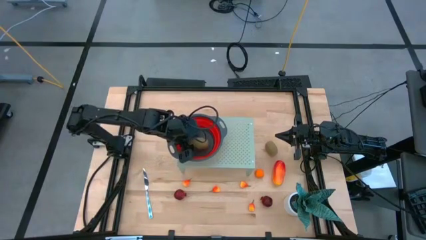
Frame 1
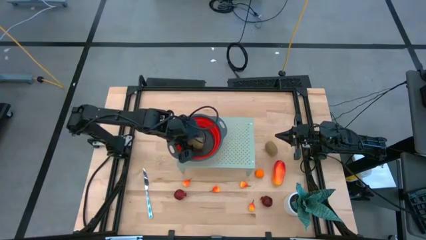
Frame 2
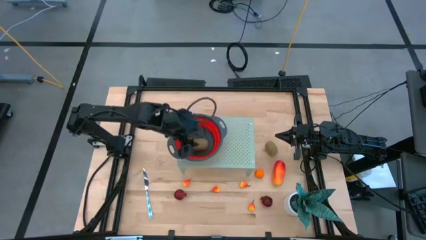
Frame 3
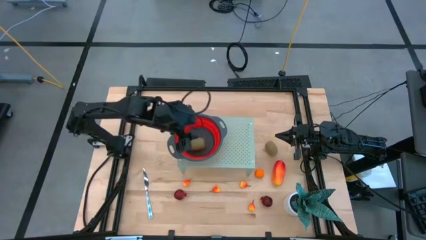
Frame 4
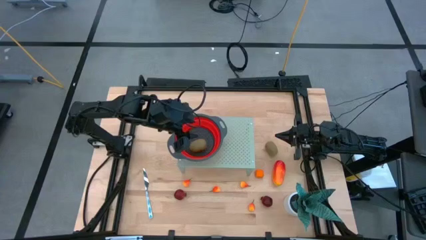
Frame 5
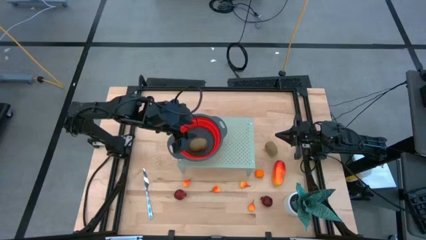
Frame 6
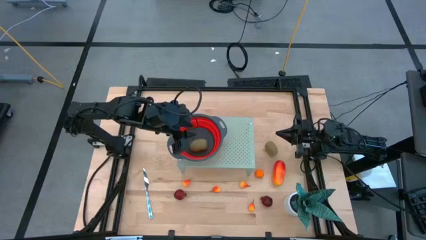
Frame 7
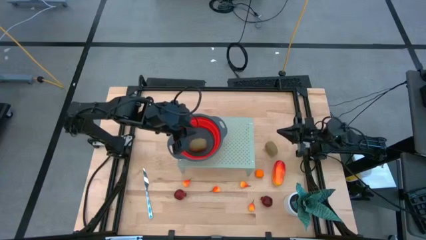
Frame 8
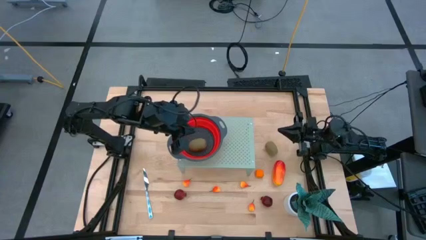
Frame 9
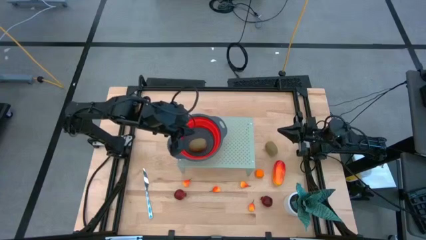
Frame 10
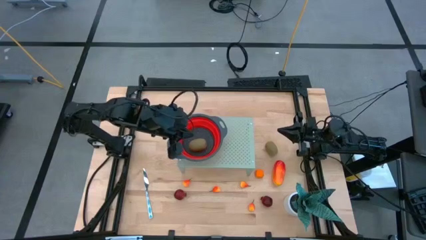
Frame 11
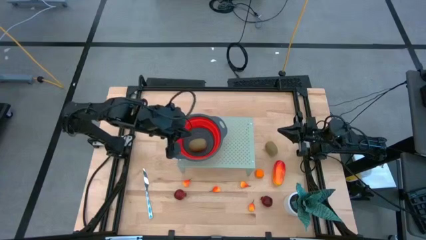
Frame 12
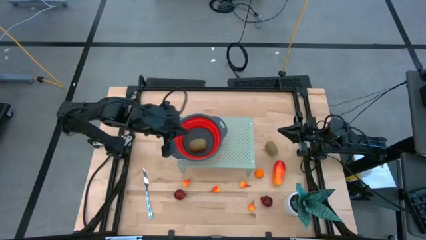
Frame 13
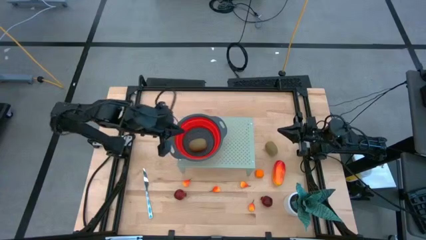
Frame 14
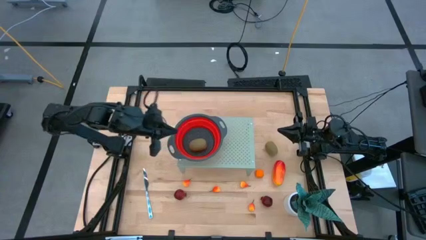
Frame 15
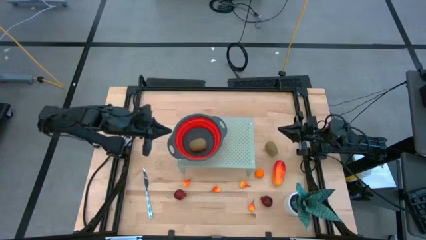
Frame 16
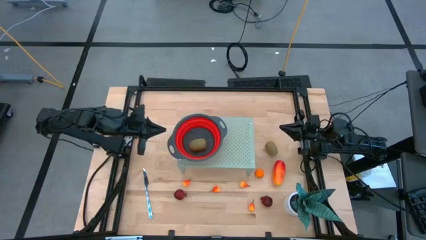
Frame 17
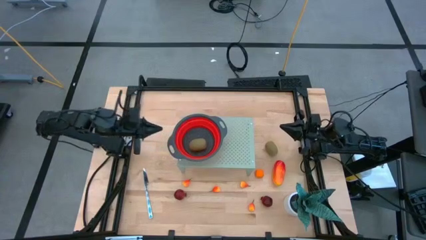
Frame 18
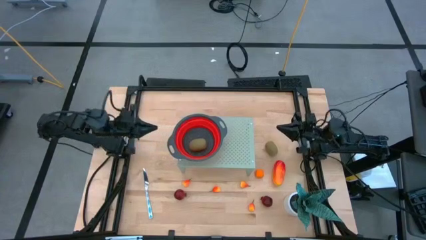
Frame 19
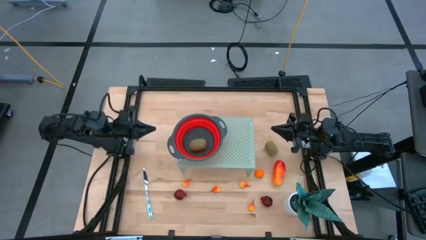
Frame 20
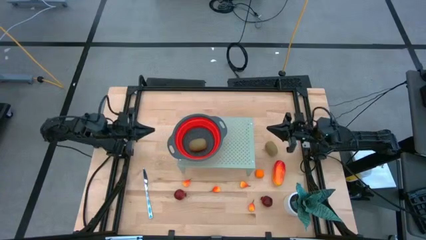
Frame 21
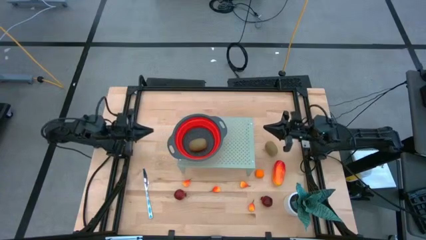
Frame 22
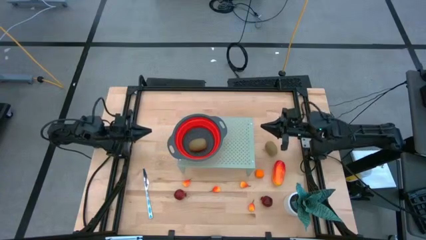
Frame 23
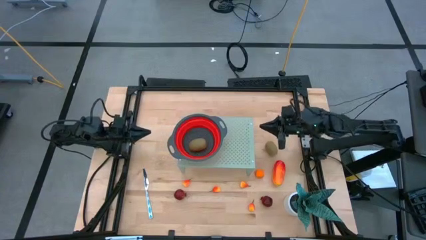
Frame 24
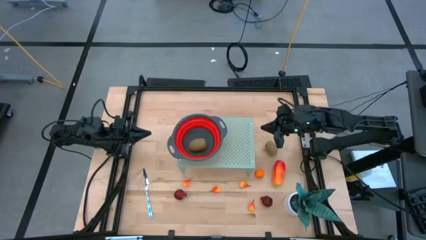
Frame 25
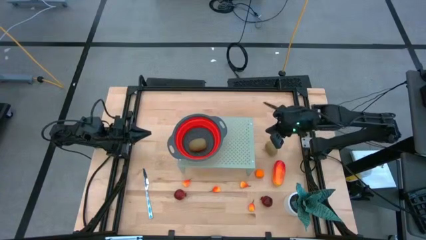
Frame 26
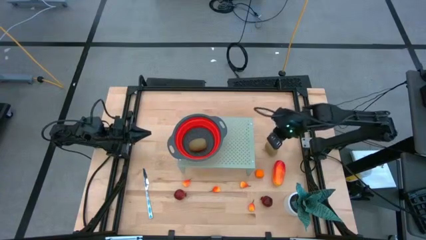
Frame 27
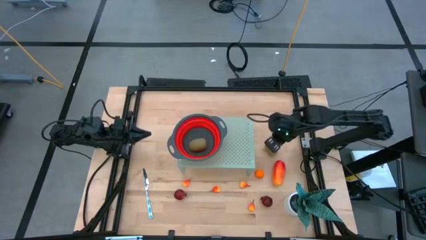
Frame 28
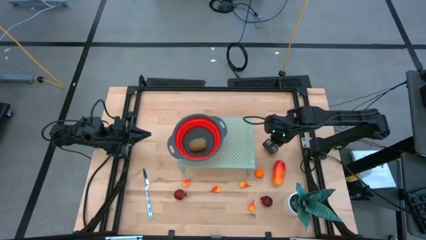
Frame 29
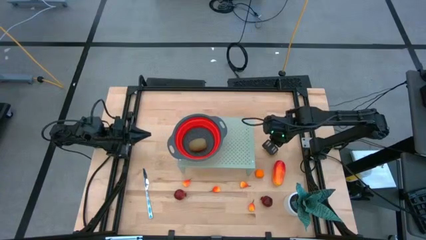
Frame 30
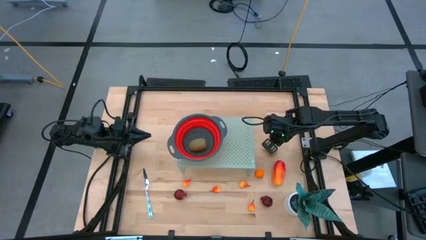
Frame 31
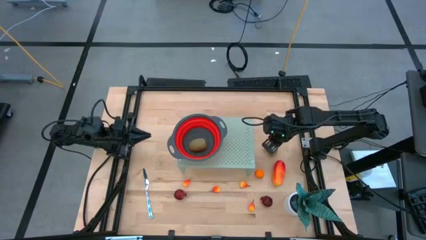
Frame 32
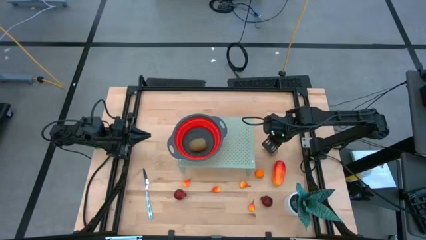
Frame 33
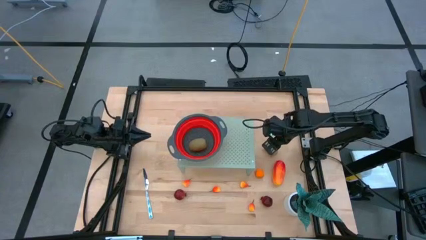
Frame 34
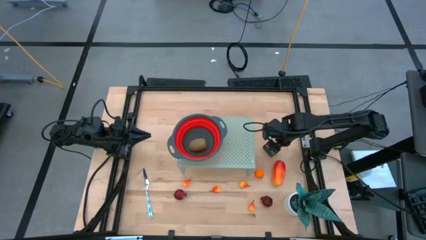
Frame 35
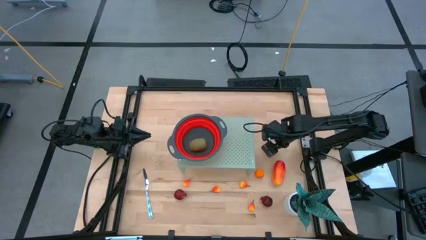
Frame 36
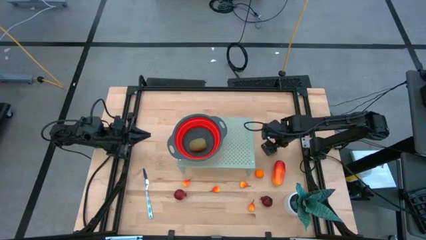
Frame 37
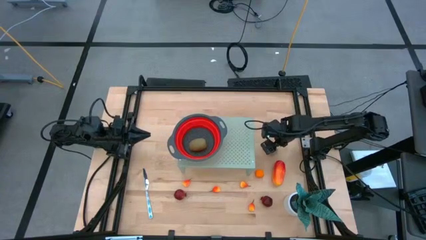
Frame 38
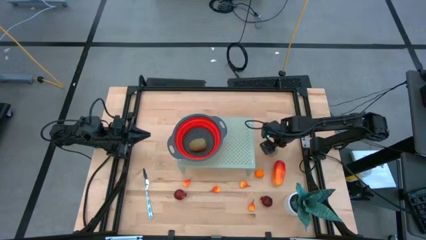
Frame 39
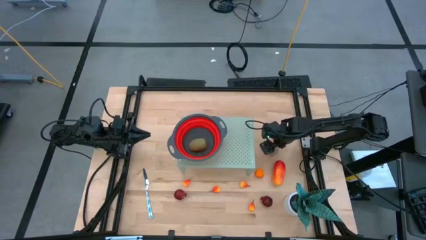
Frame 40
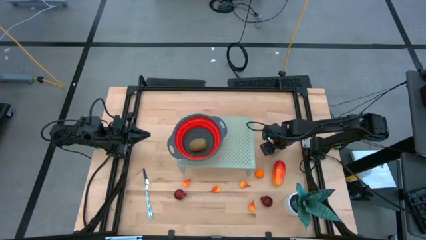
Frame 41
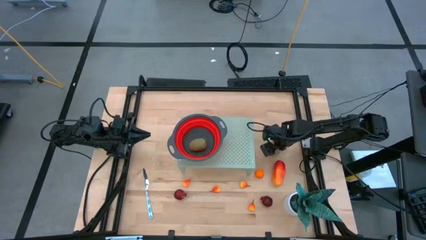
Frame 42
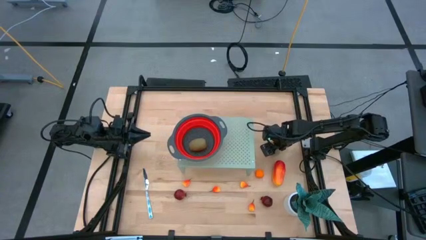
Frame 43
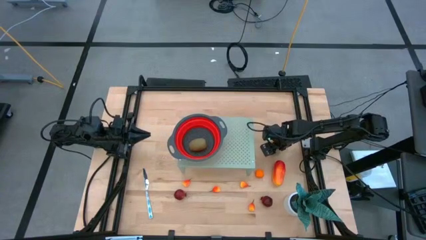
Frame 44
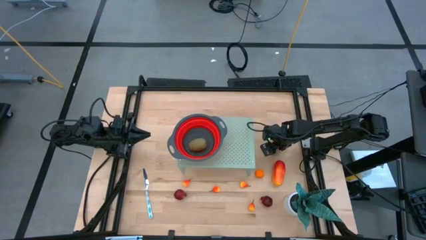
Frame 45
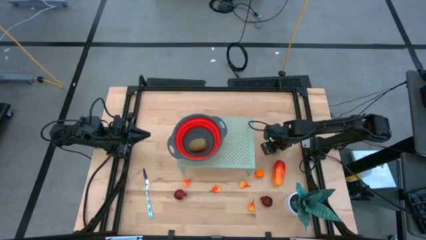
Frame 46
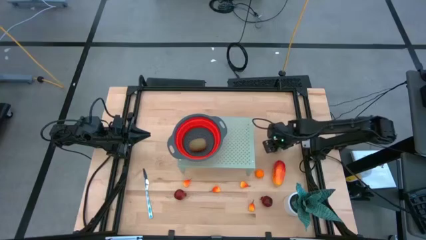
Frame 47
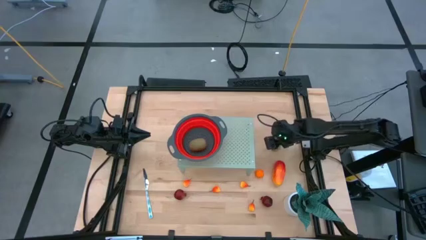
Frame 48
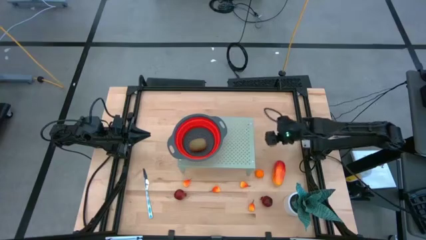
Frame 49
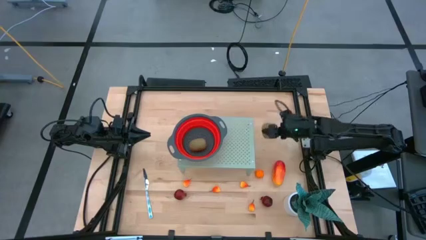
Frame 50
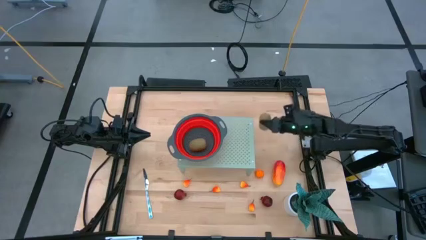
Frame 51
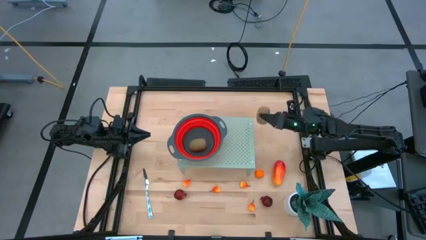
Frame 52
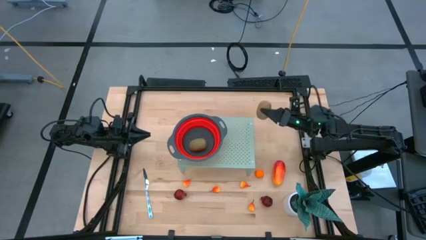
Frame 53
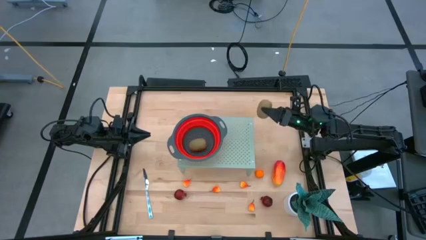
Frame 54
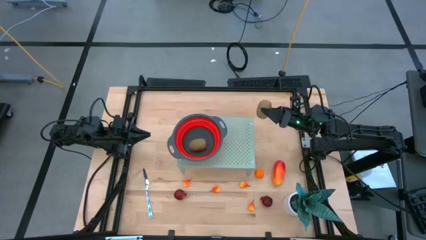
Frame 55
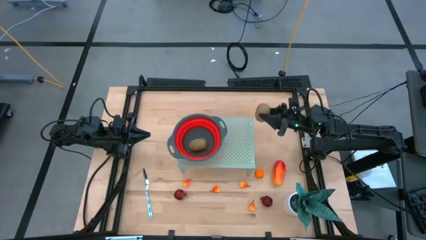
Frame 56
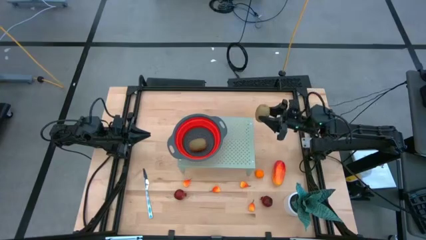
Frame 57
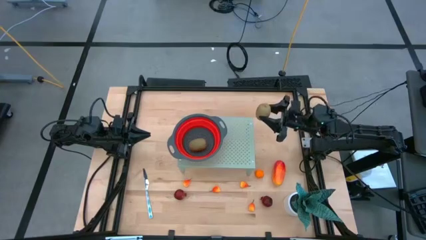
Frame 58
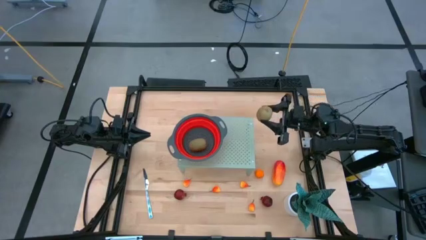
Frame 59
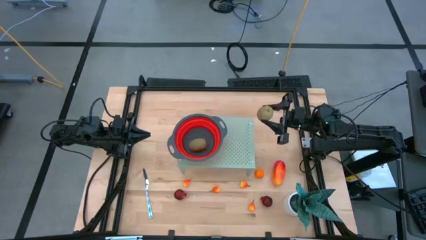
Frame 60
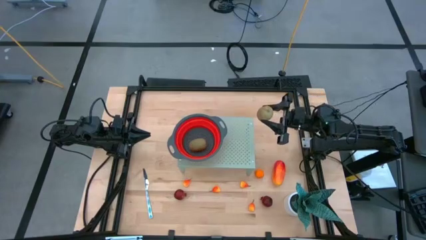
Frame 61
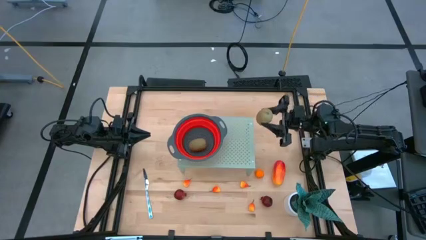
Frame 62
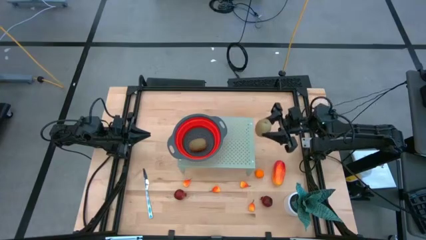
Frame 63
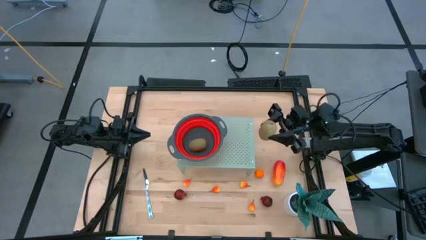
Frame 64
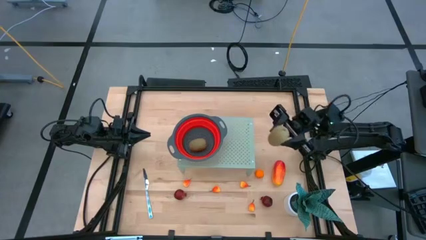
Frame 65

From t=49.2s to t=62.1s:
Task: Pick & Place Fruit
Put the kiwi fruit into the strainer

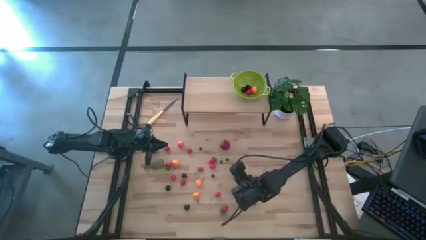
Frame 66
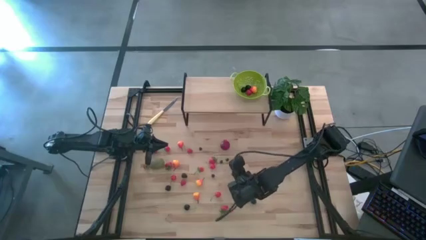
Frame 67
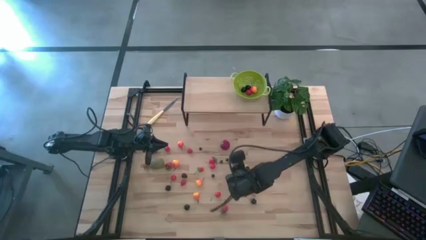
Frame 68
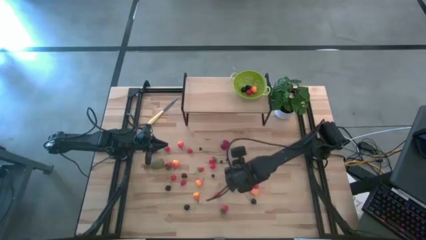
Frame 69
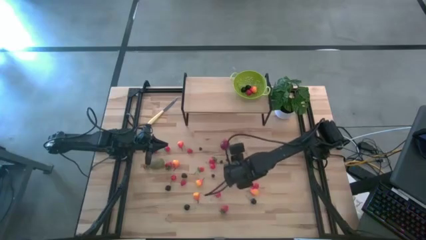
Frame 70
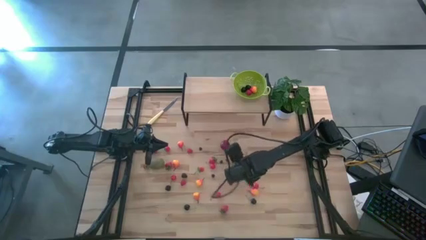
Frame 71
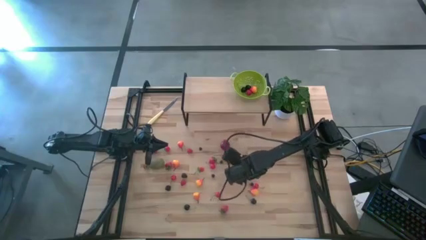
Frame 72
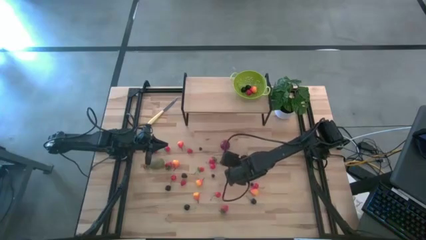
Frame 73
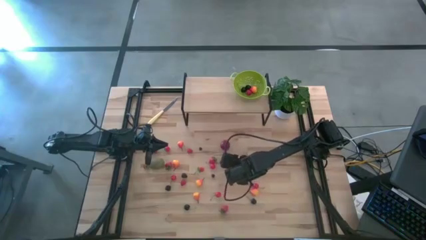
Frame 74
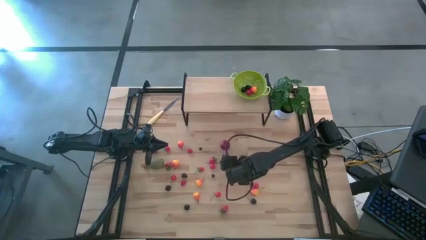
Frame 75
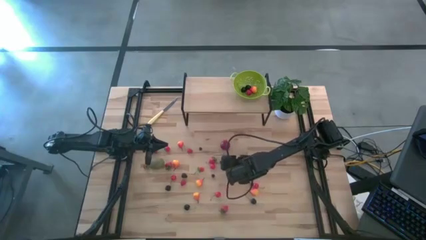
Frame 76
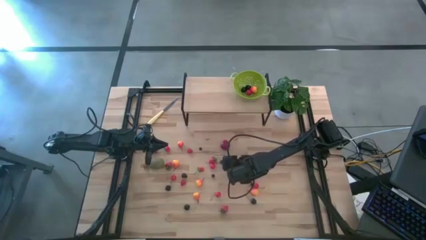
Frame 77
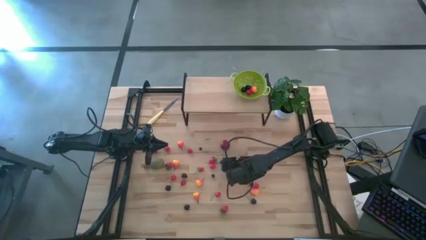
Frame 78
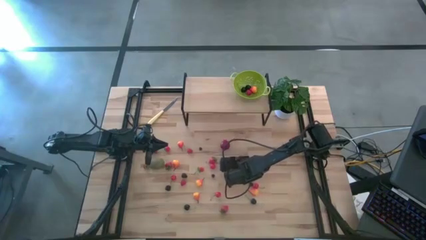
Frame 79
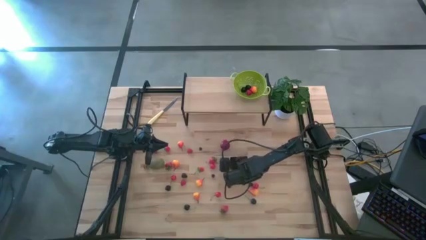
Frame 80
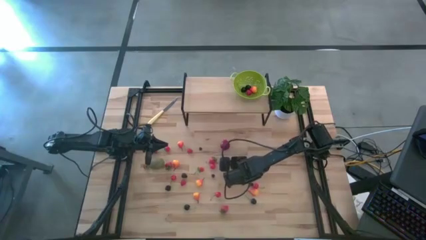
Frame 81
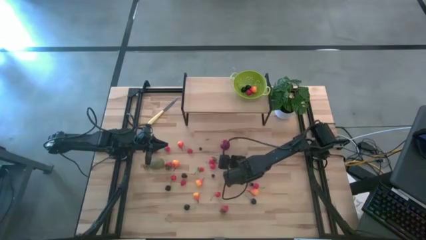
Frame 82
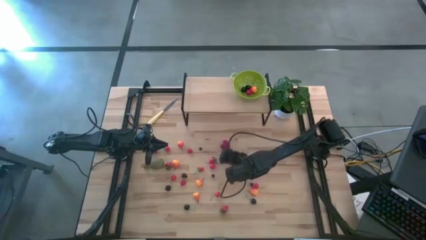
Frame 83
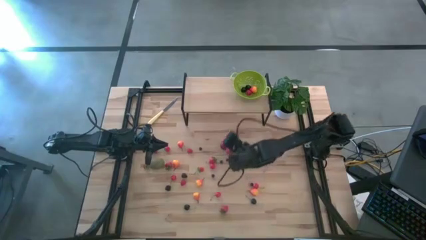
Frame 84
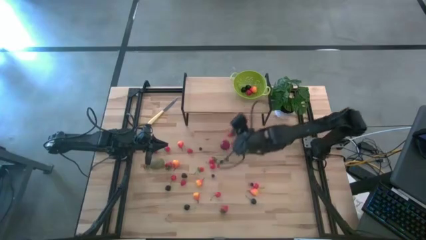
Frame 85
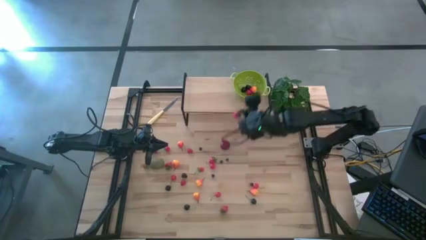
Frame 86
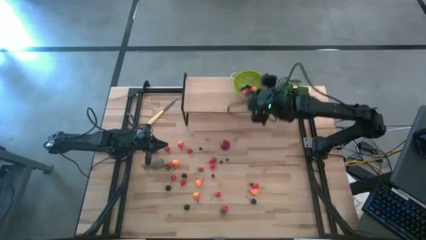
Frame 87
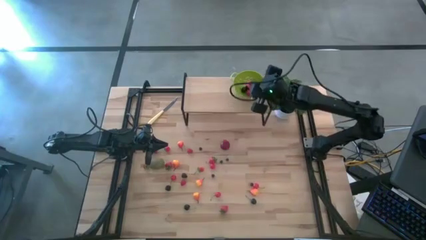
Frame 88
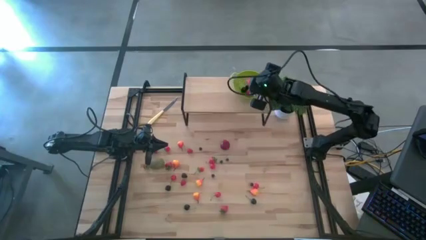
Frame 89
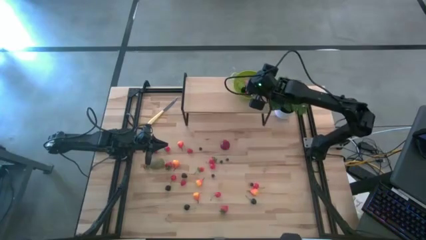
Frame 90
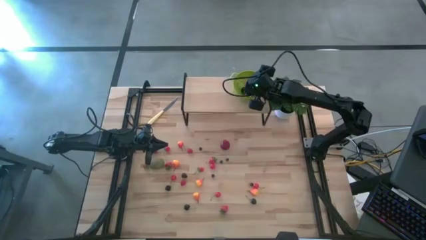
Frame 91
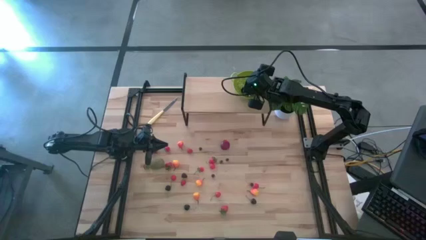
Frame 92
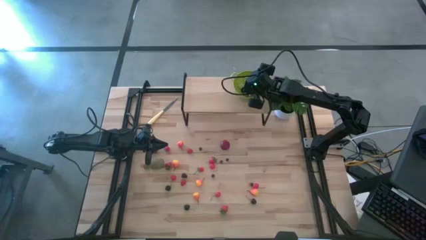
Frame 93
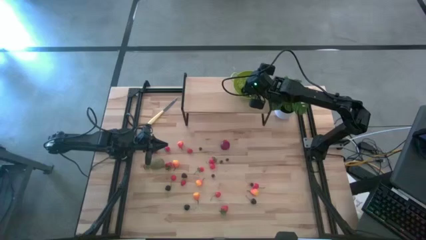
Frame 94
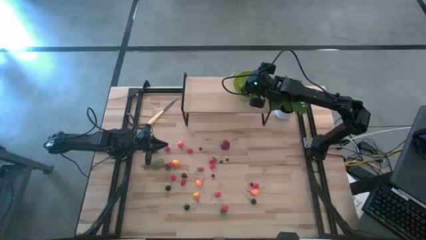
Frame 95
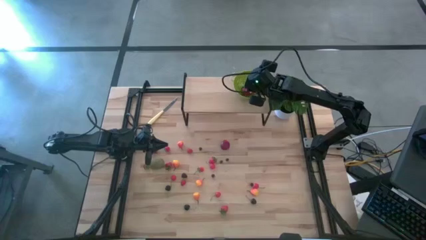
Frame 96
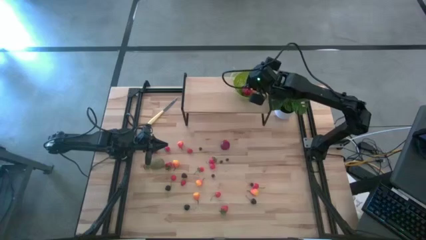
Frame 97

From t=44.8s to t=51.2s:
Task: Build produce basket
Put the strawberry into the green basket
